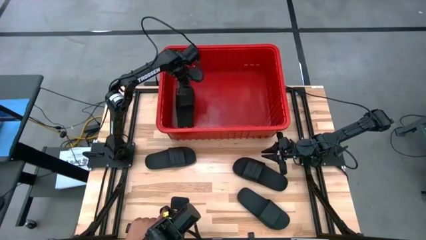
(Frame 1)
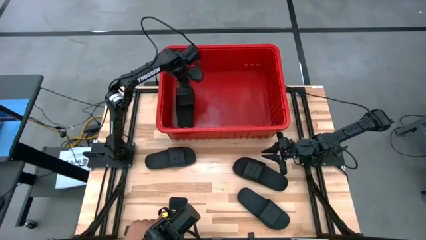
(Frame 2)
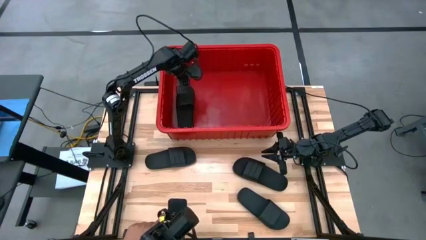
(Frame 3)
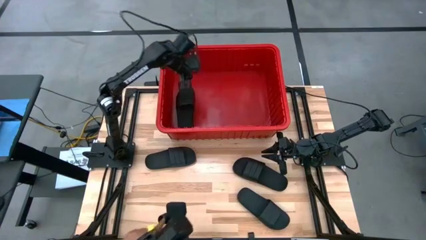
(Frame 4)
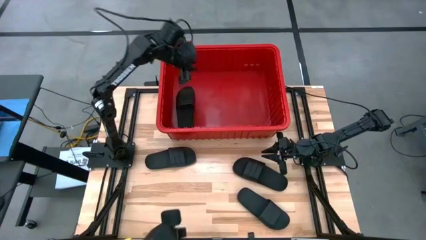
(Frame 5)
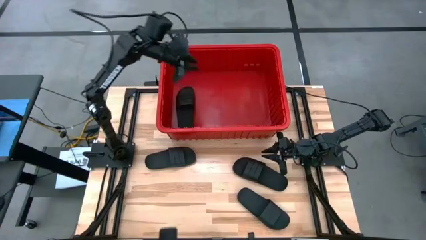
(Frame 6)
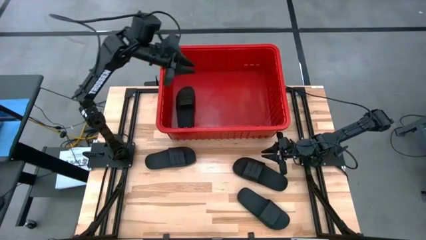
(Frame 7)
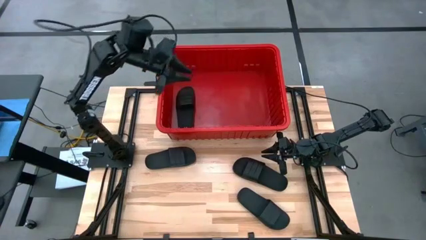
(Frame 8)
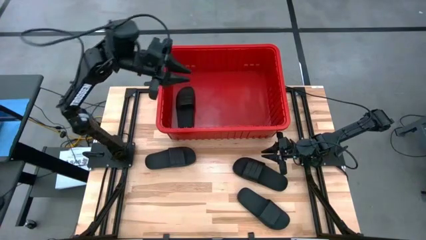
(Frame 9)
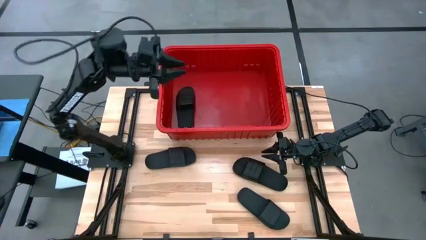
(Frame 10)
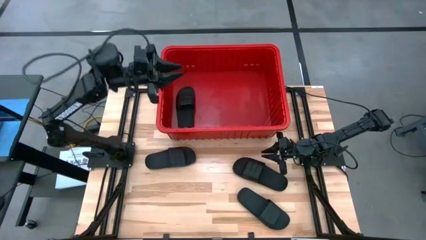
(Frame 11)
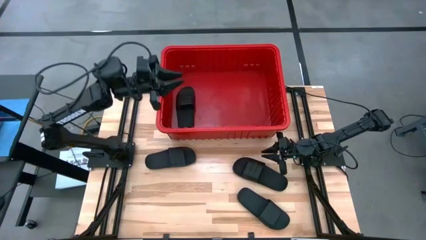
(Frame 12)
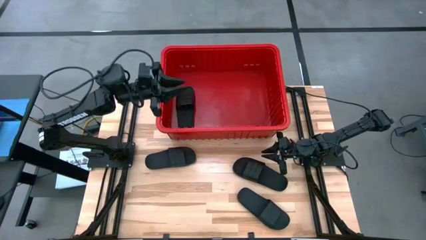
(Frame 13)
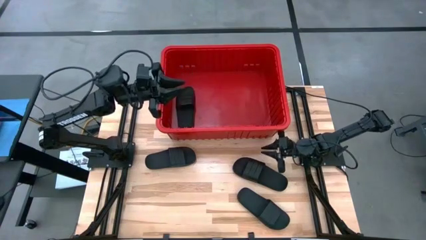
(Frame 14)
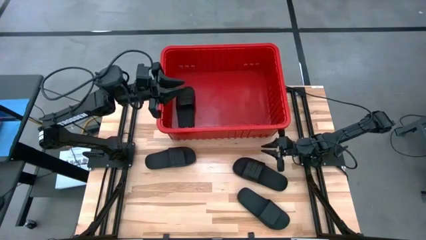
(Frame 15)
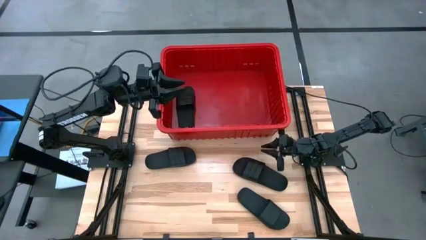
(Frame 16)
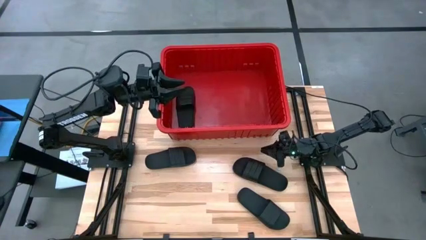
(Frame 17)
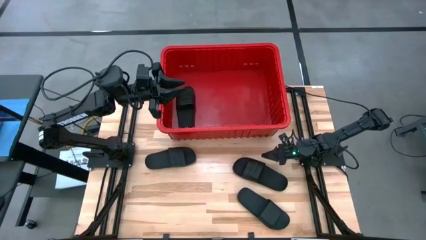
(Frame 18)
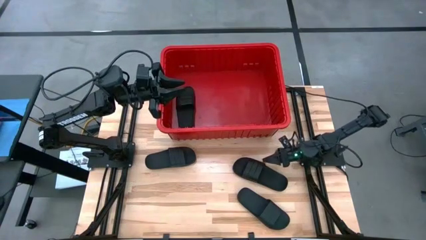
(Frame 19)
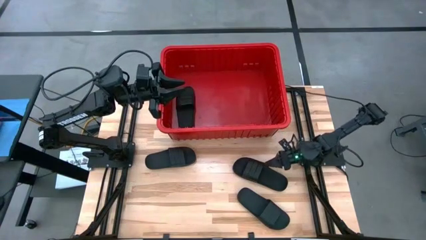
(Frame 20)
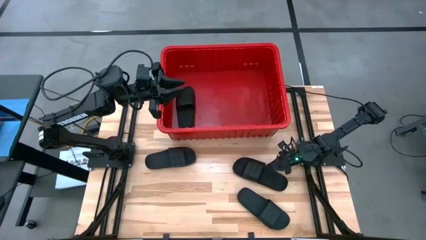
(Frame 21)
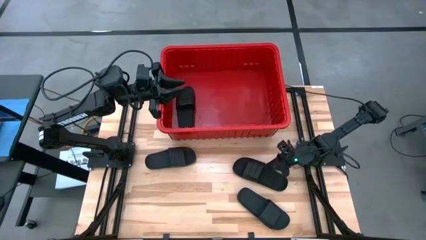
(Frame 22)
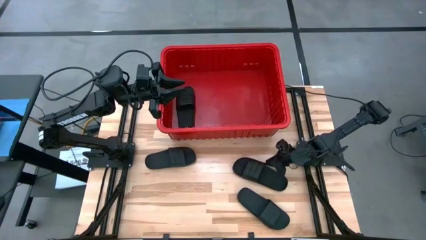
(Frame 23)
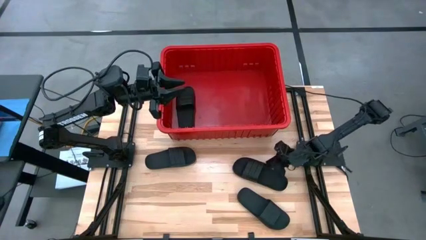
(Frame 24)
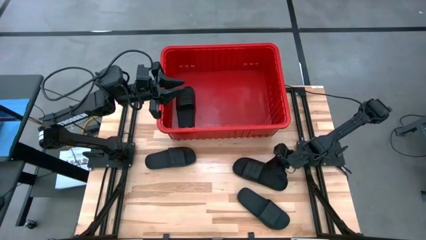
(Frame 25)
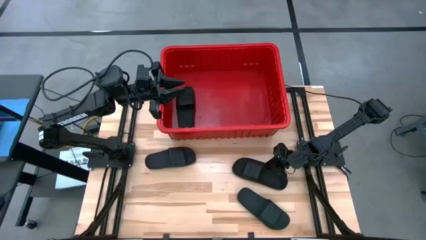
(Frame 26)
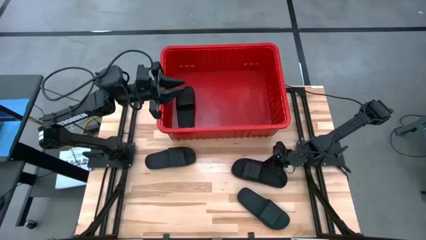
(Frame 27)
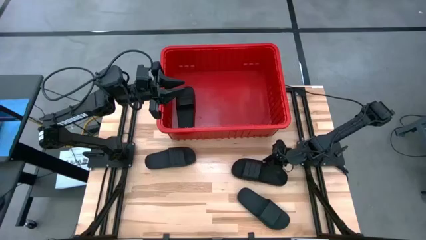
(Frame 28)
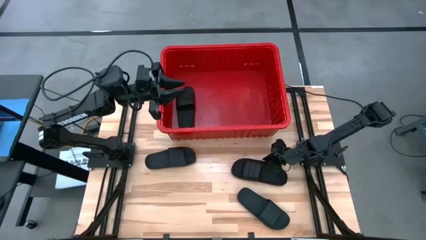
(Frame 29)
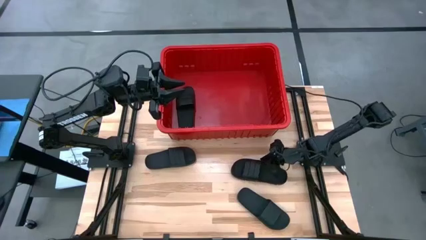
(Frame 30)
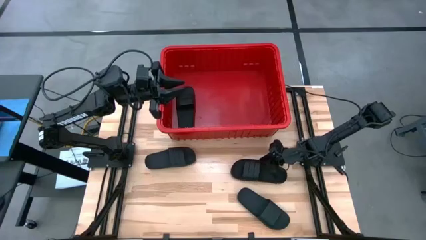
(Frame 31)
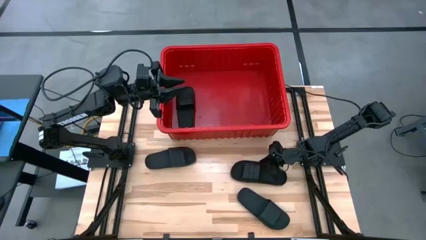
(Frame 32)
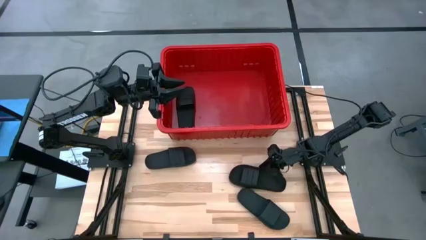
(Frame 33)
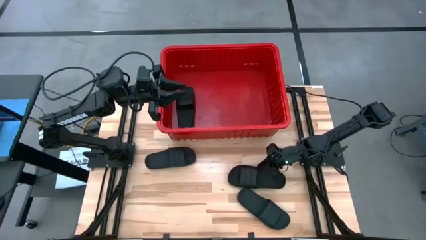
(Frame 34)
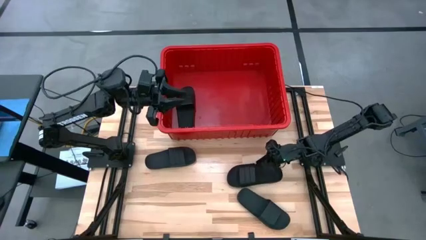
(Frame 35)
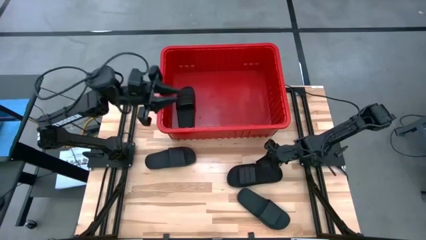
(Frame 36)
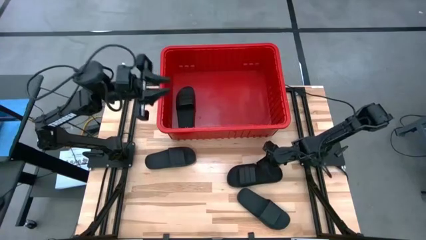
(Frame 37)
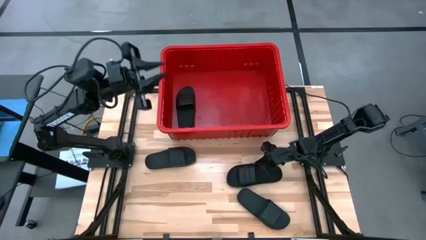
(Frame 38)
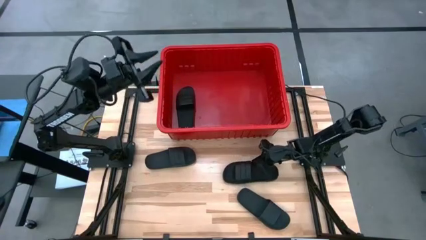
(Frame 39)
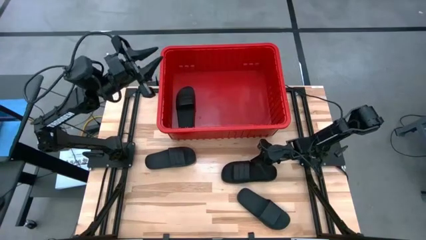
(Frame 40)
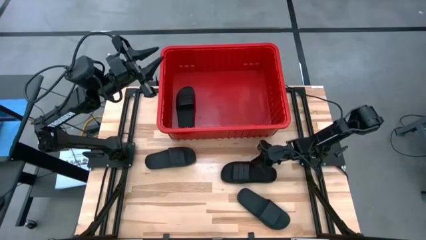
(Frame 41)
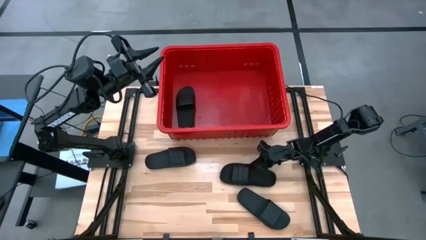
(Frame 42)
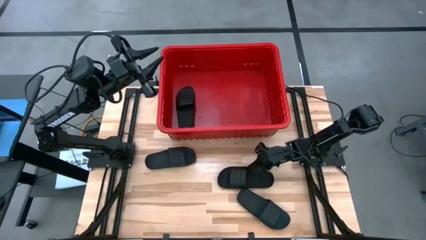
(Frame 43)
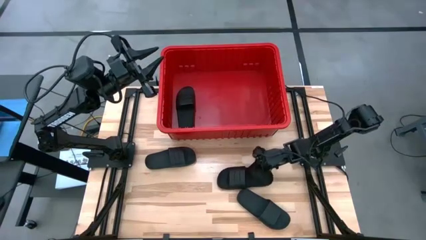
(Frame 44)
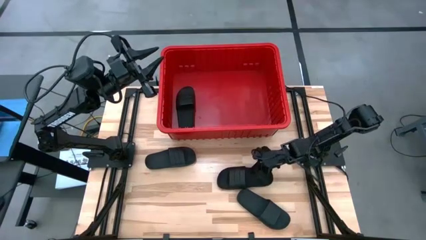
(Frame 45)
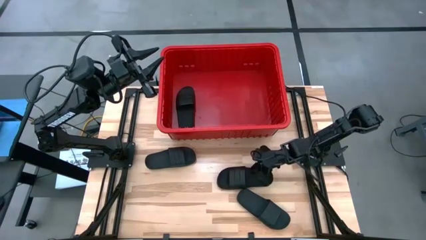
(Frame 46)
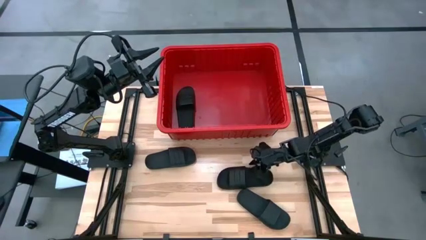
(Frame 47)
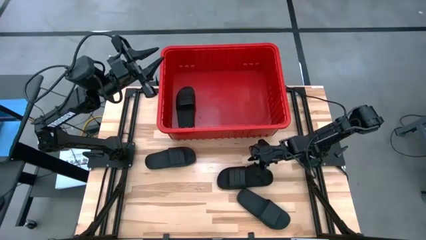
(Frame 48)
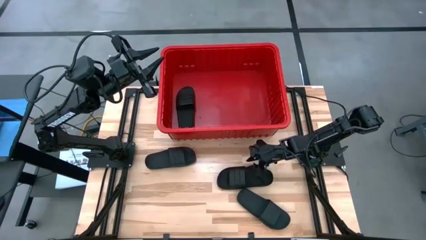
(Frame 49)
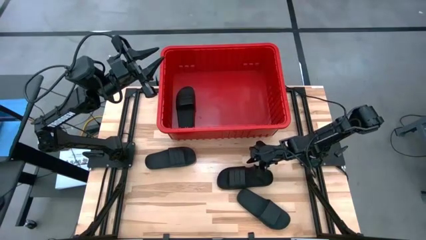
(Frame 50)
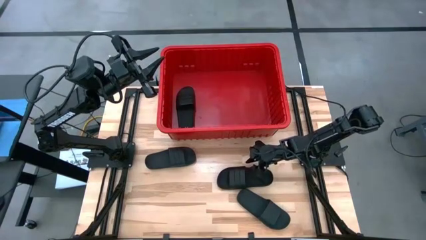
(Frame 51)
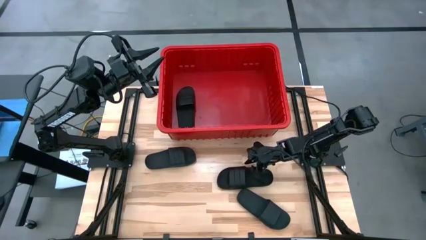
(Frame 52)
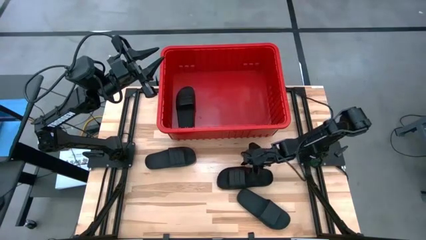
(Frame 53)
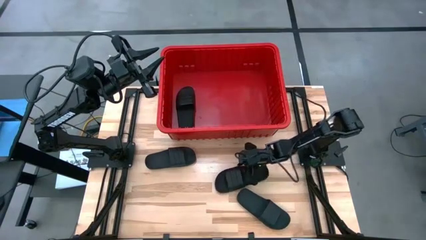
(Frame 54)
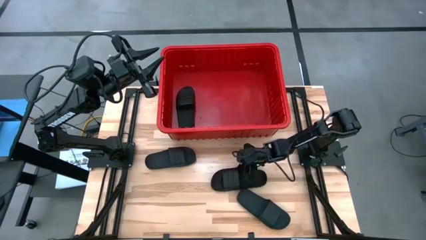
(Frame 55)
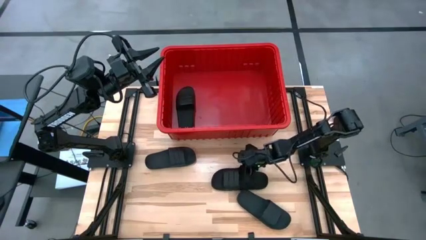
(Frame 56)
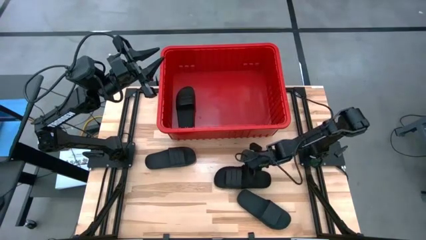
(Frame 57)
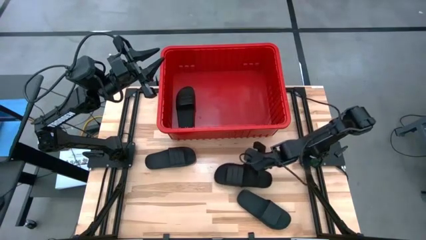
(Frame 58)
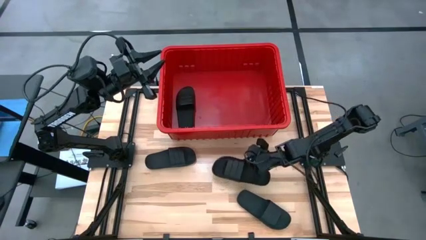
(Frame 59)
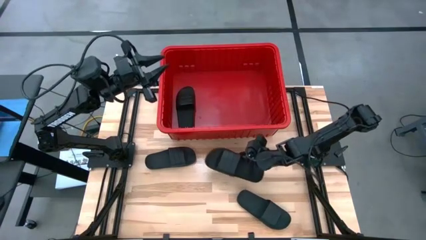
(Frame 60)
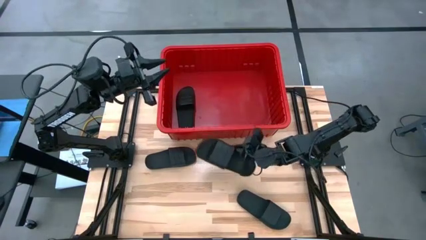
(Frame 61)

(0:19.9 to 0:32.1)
Task: Pick and place slides into bin
Put the black slide into the red bin
